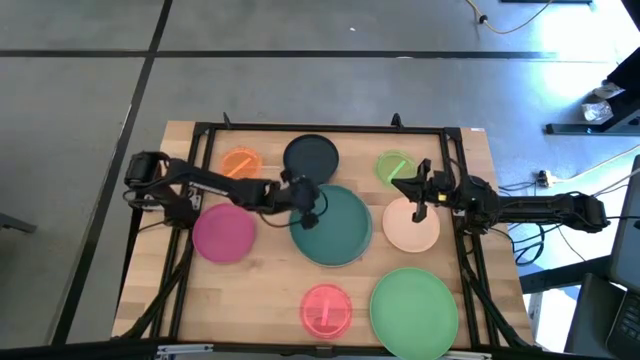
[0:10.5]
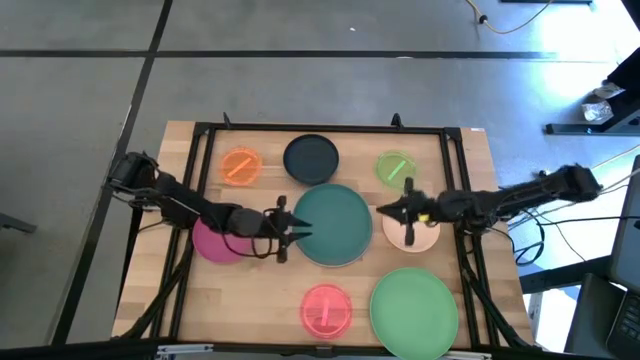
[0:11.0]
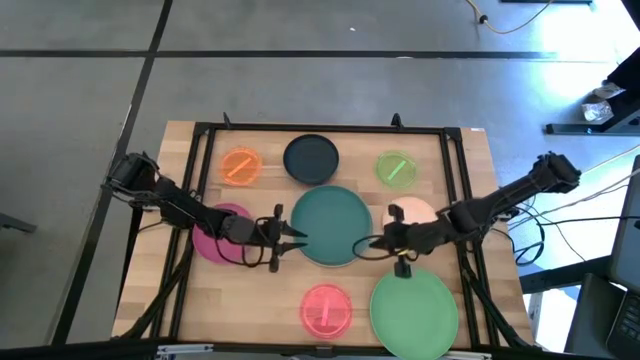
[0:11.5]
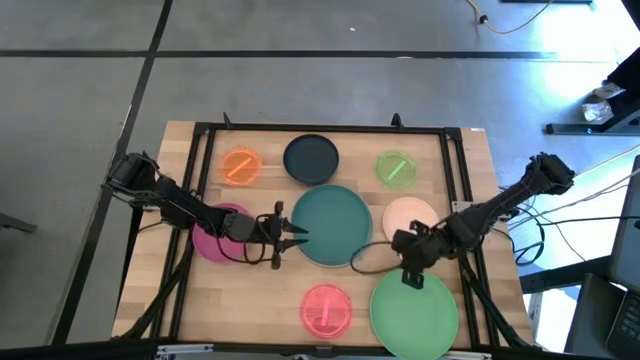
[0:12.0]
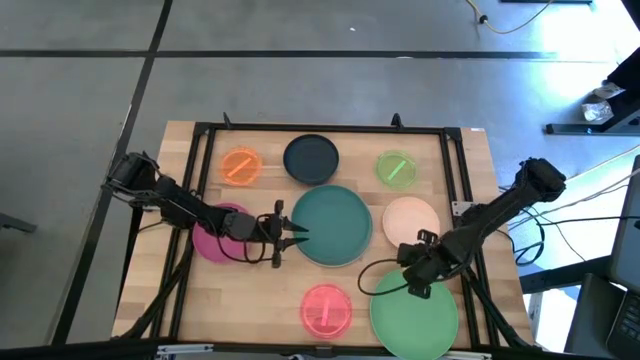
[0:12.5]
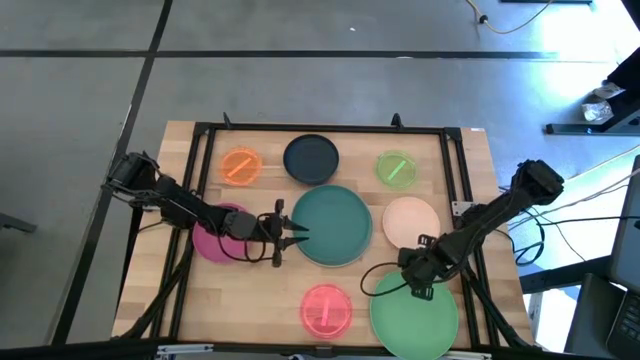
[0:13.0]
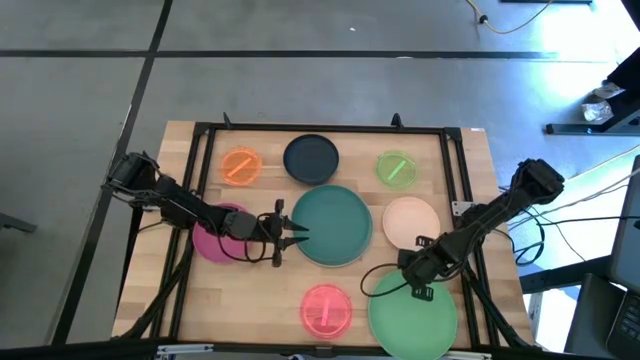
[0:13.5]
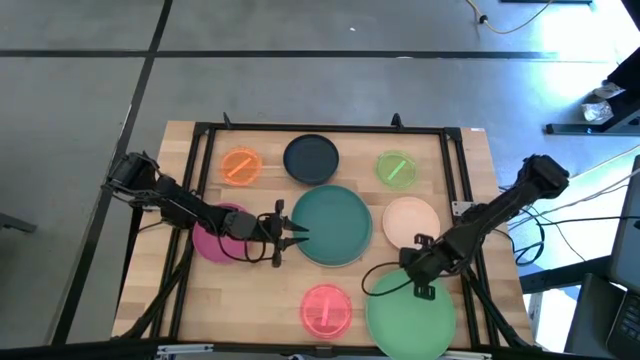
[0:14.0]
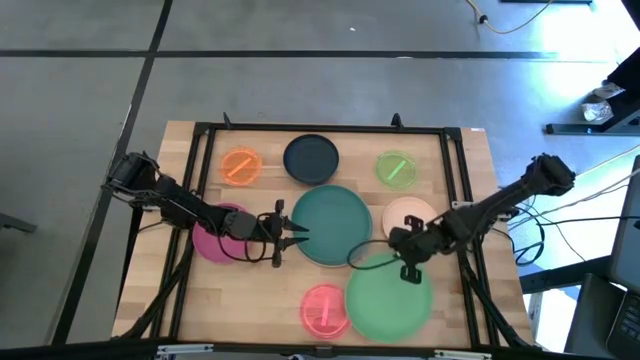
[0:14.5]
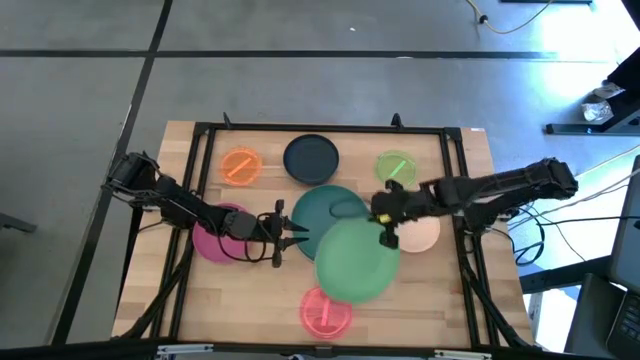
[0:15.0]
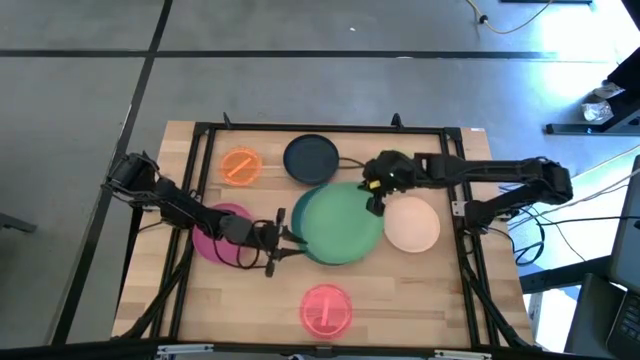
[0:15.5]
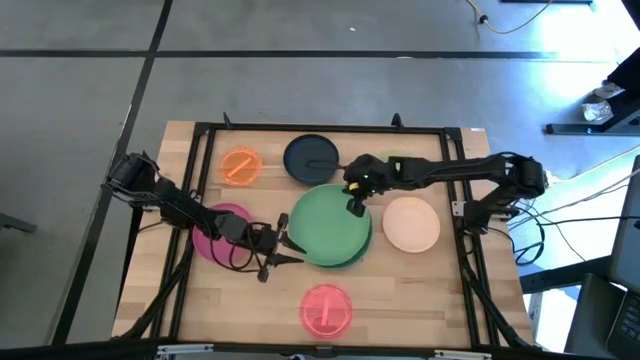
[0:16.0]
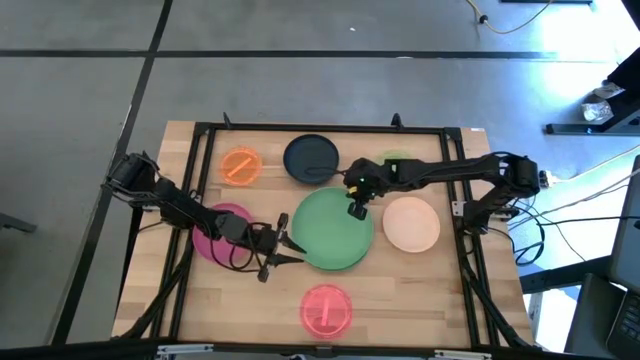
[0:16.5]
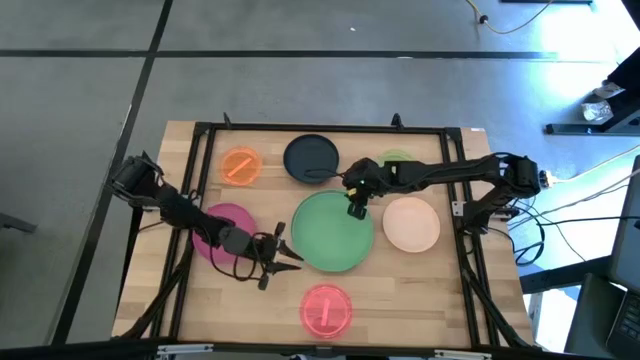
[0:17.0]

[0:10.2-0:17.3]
Task: Stack plastic plates
Stack the light green plate on top of the green plate

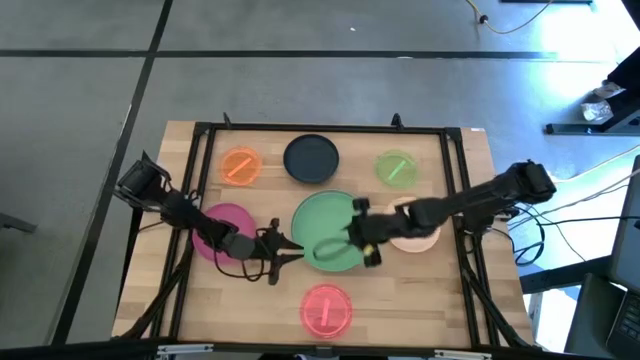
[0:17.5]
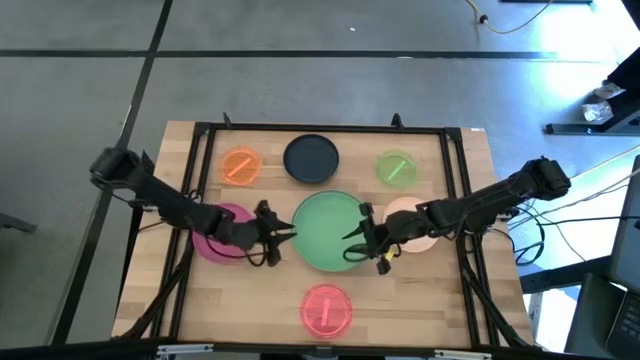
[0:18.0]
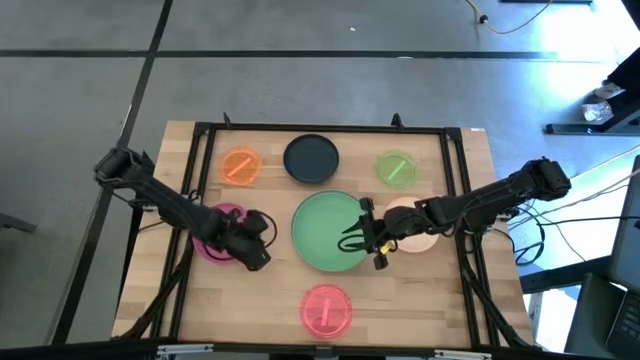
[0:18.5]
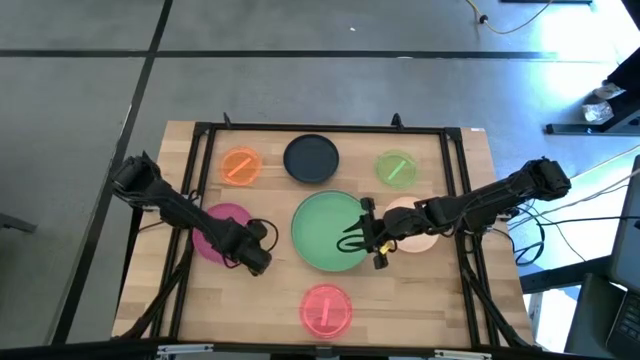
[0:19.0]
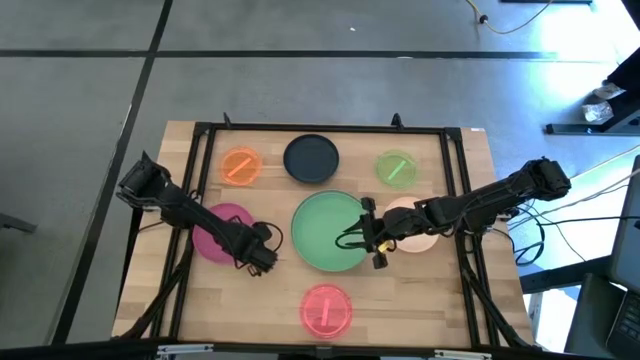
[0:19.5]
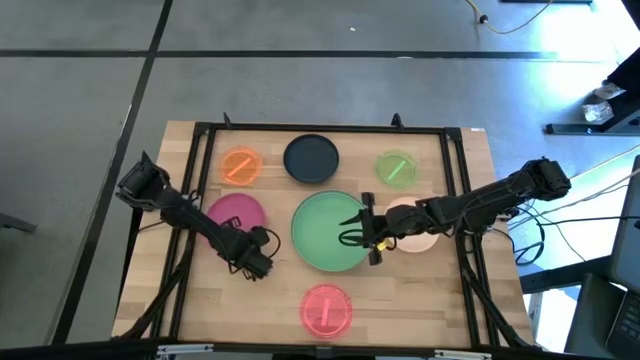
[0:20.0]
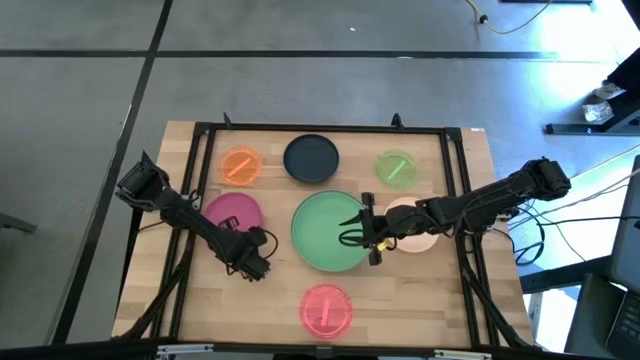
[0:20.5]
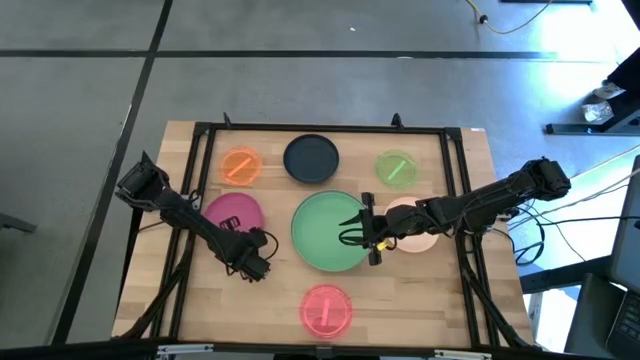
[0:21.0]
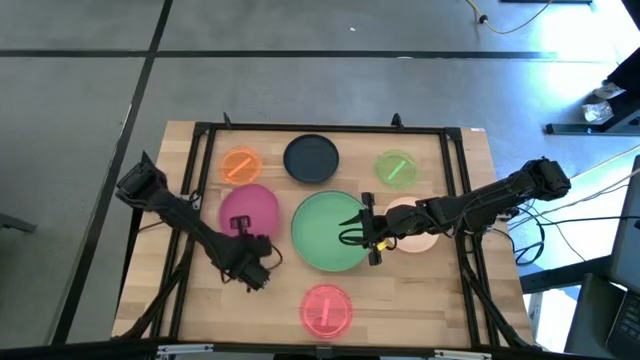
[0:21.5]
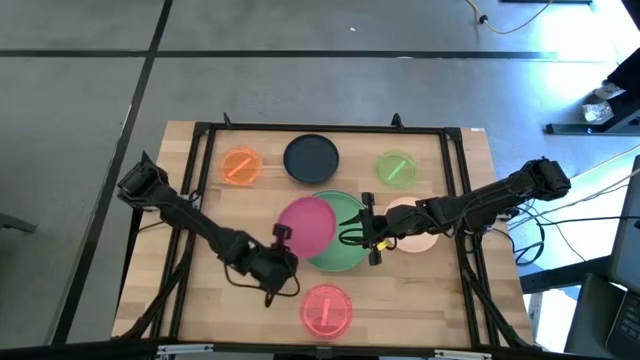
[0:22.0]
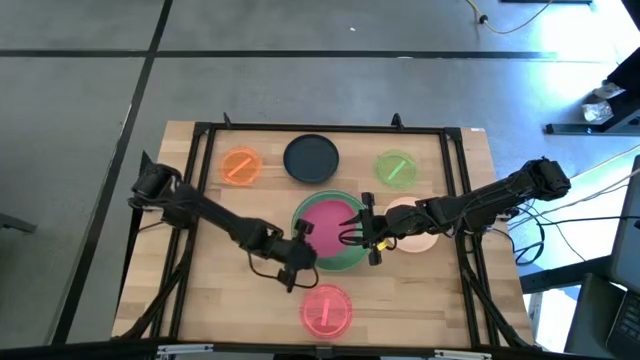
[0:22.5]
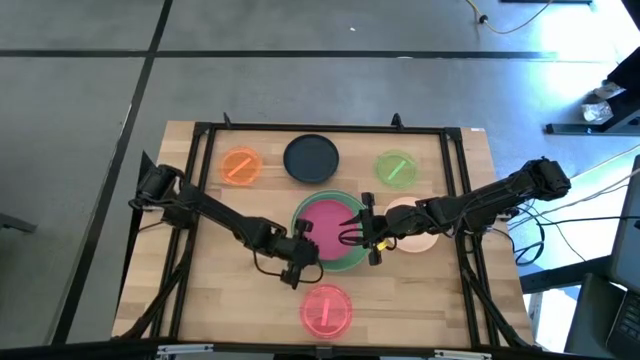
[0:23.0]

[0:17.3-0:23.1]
Stack the pink plate on top of the light green plate

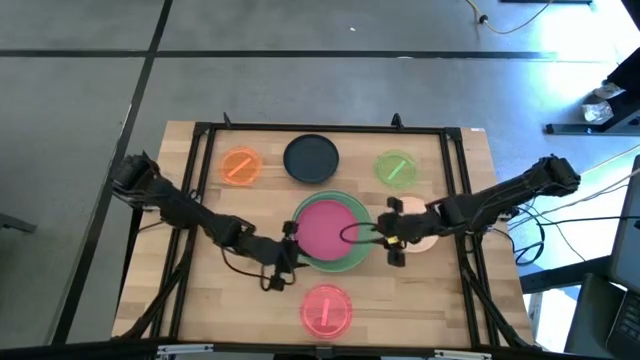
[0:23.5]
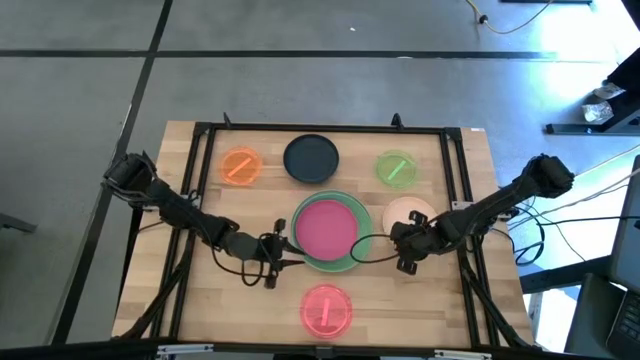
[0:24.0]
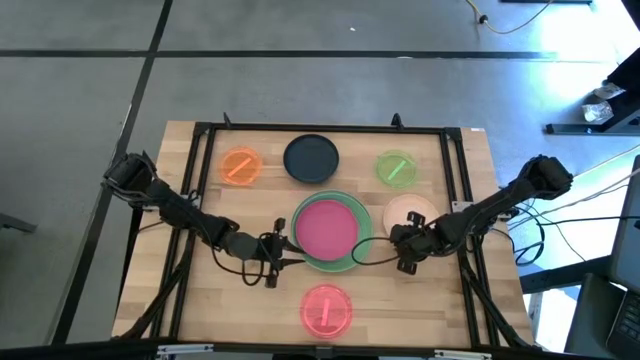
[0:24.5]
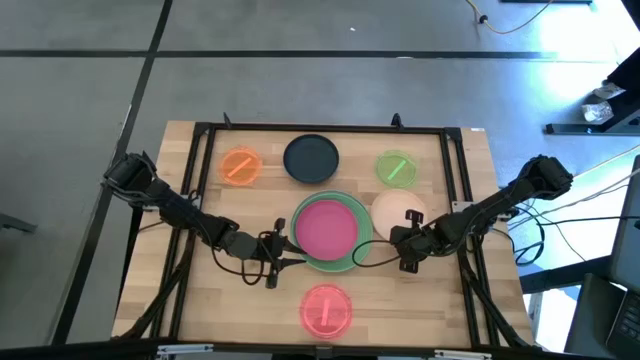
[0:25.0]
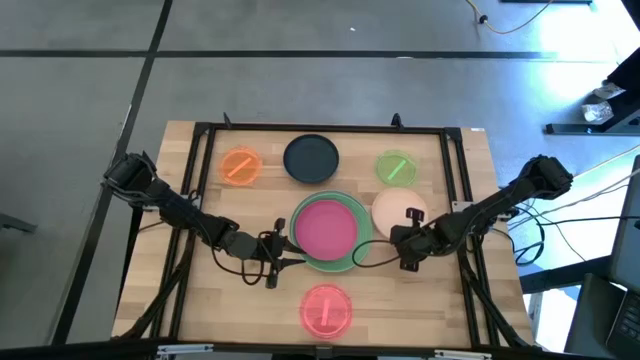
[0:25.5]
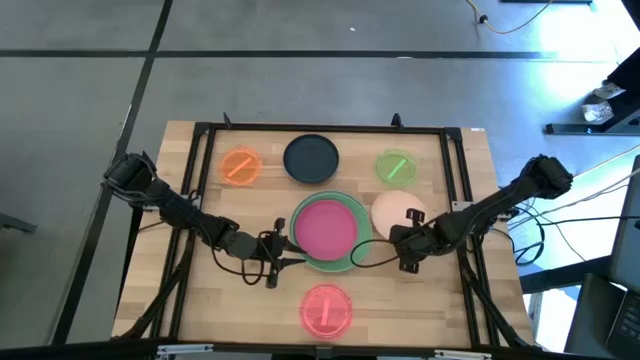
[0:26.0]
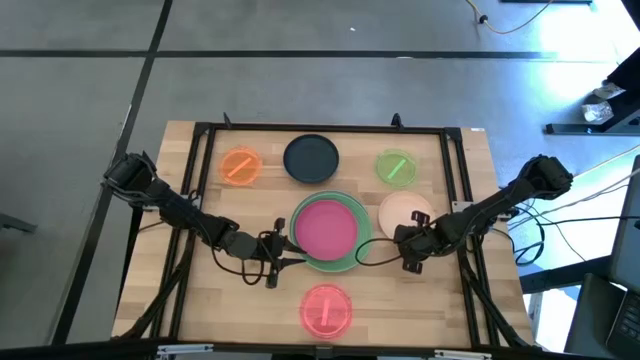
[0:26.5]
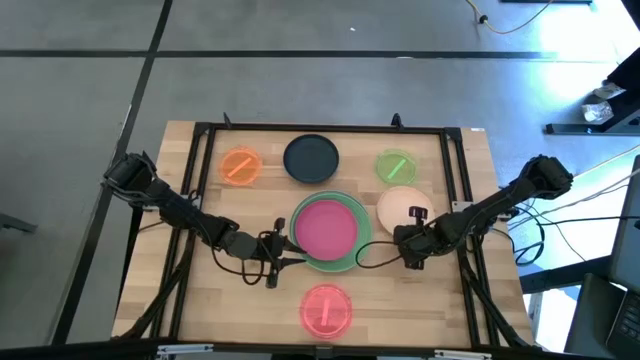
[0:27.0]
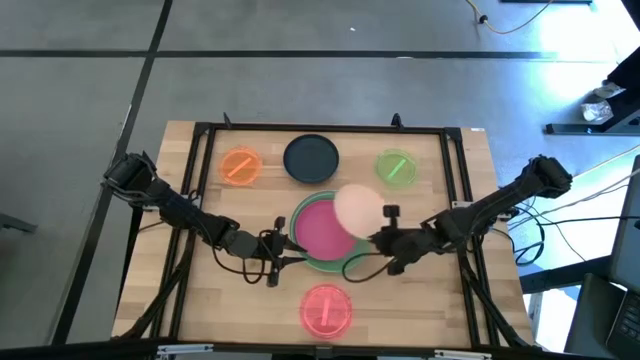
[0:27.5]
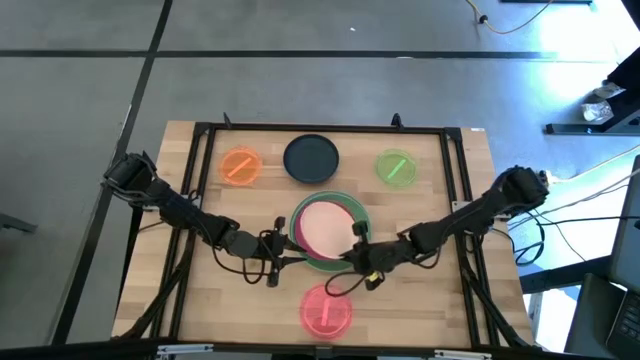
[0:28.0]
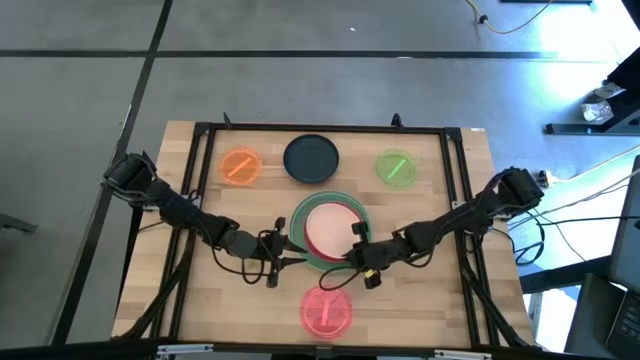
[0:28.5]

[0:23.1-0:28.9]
Stack the light red plate on top of the pink plate

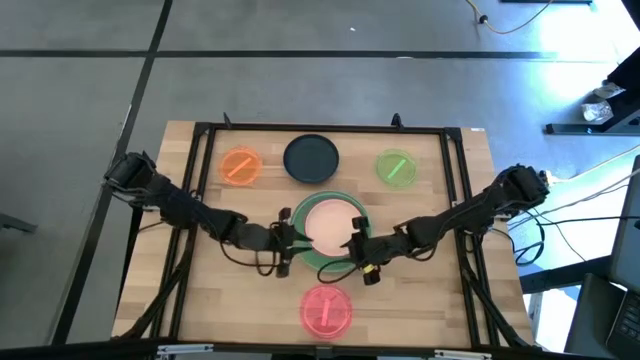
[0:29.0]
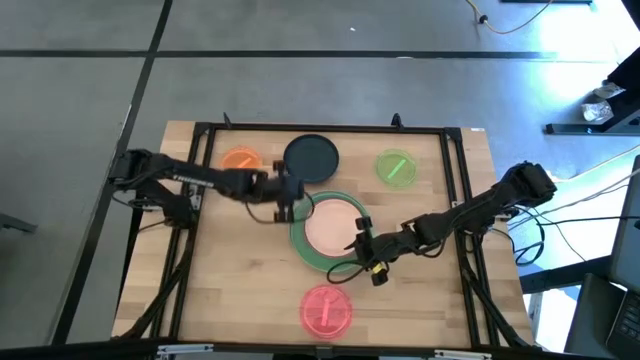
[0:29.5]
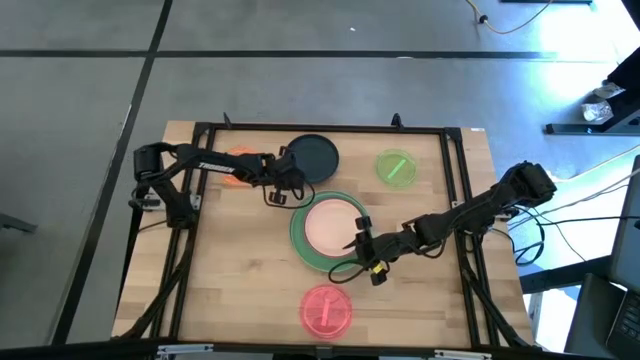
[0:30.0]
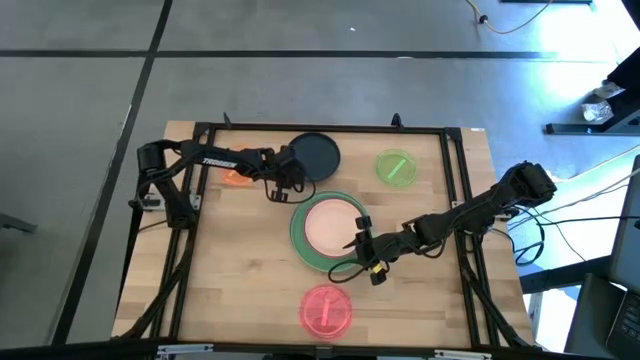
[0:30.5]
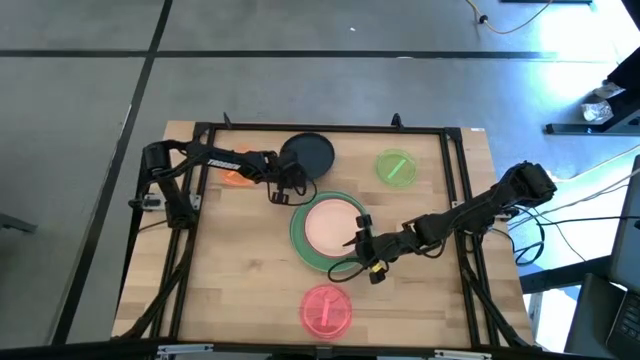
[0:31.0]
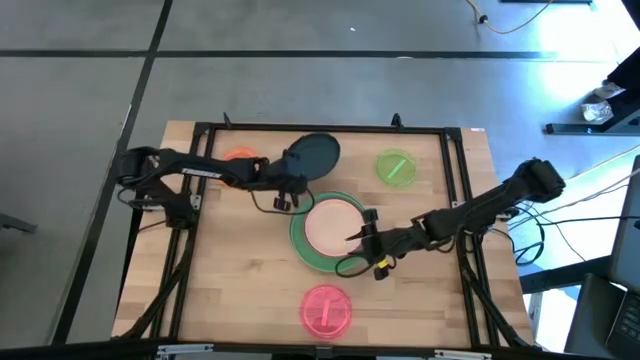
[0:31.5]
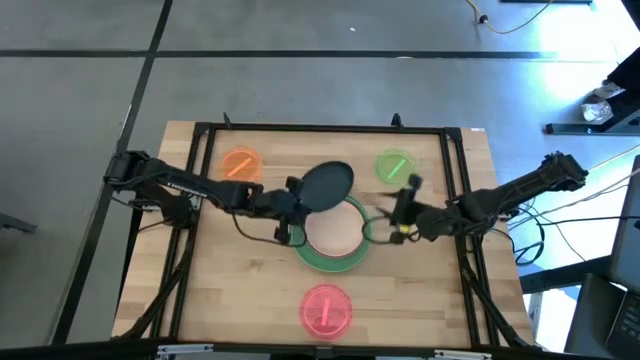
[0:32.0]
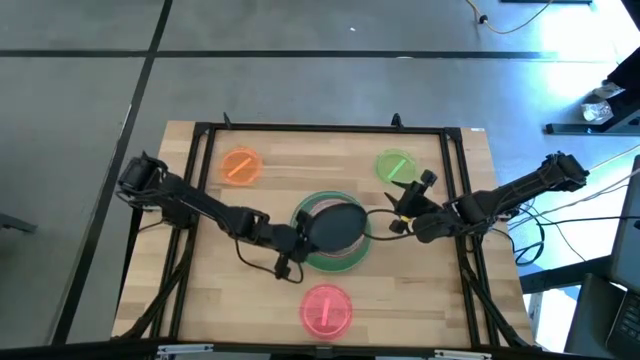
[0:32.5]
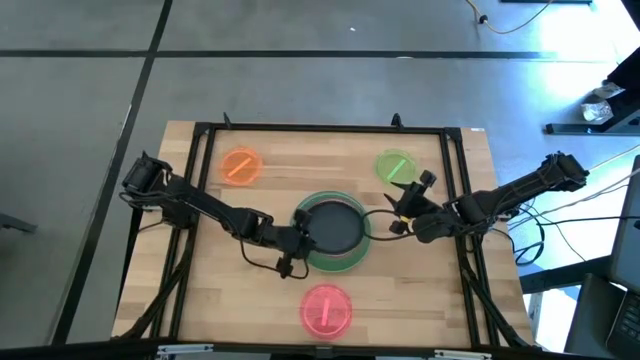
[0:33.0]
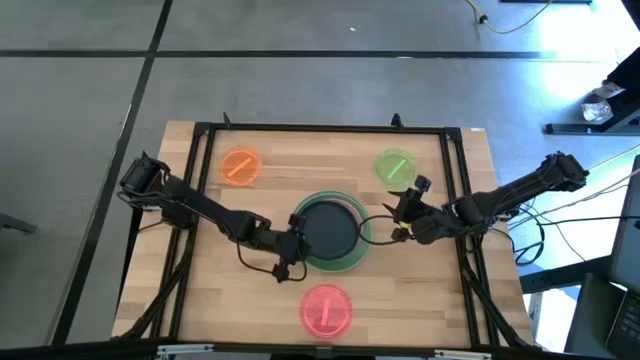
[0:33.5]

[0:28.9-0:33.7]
Stack the dark blue plate on top of the light red plate
